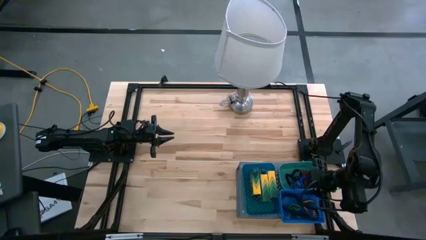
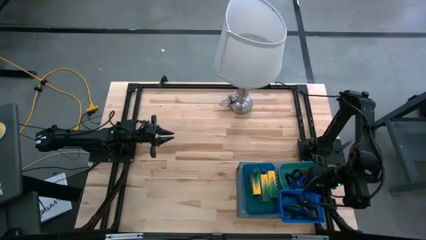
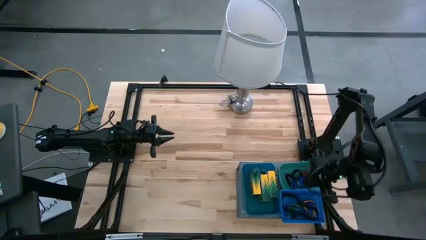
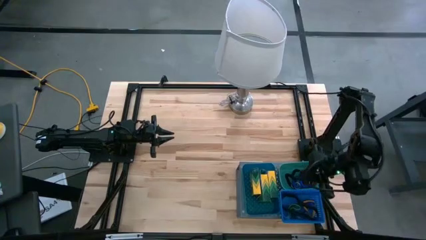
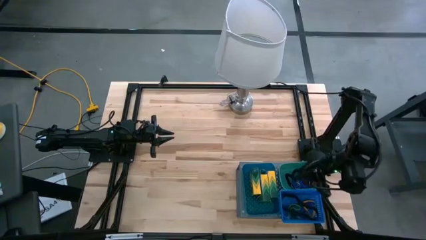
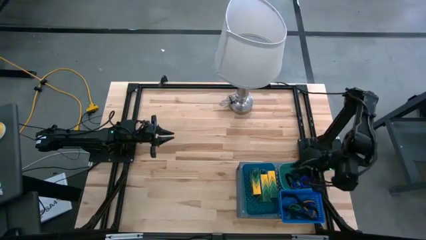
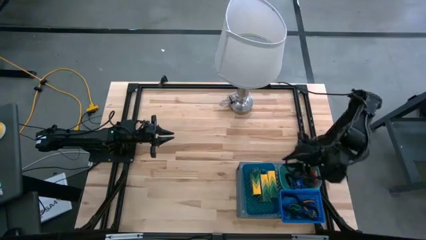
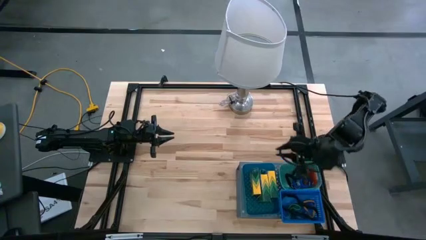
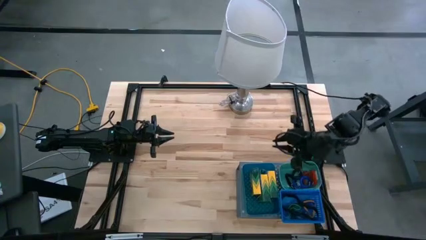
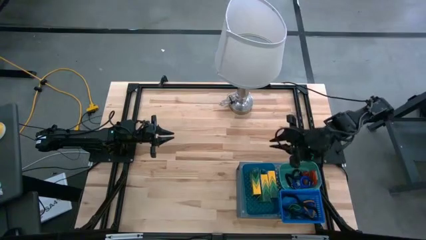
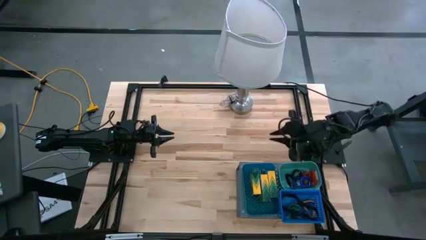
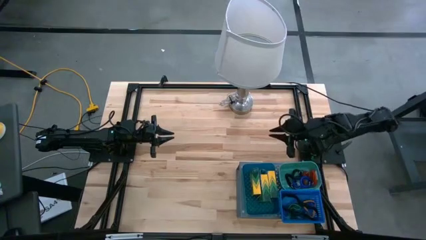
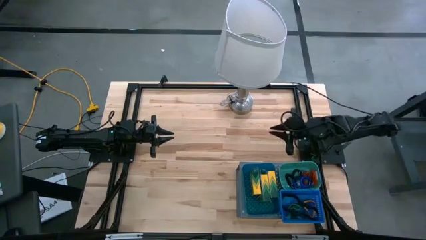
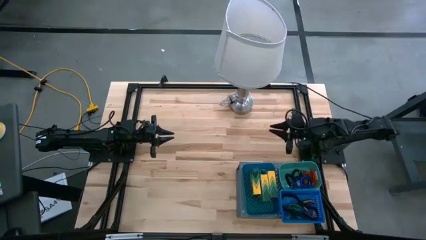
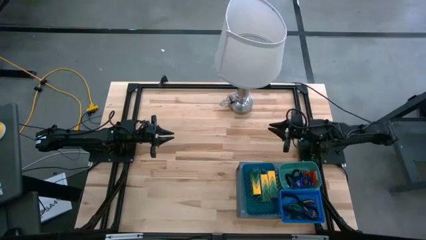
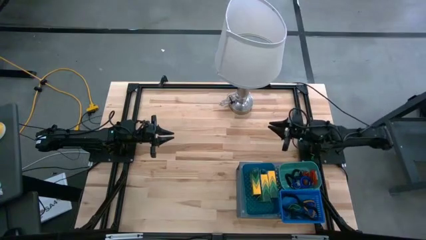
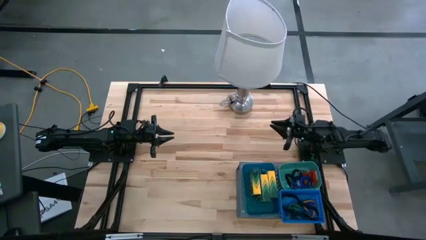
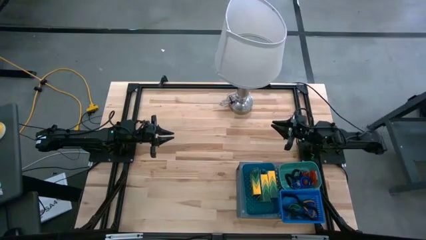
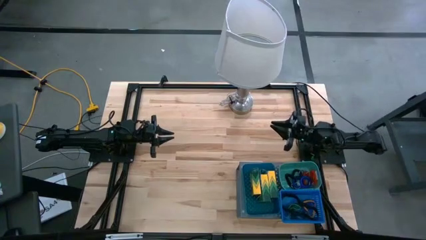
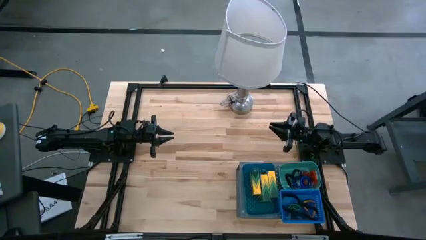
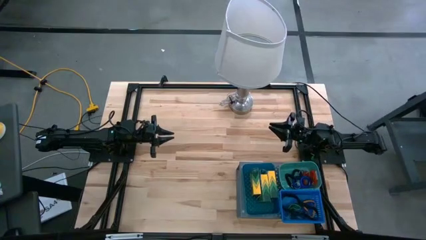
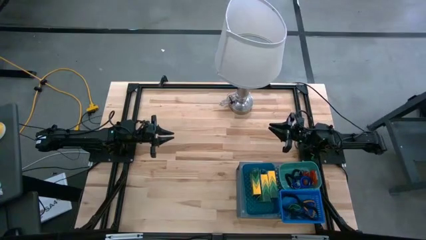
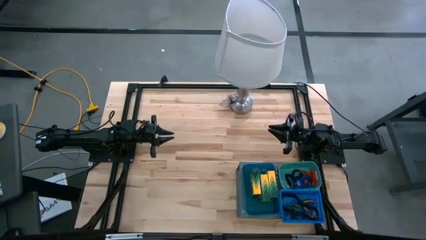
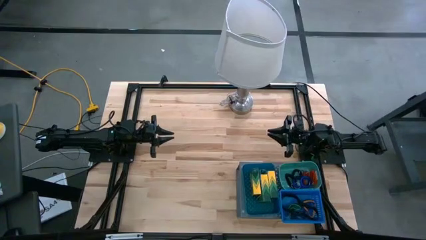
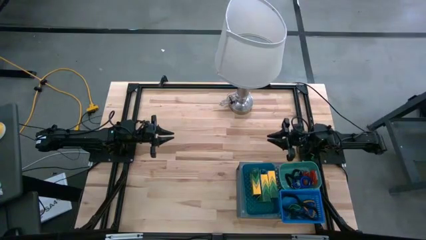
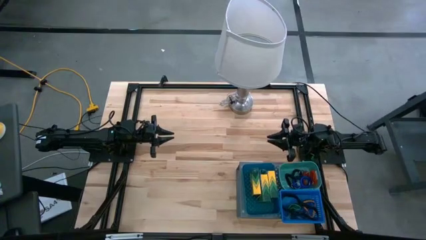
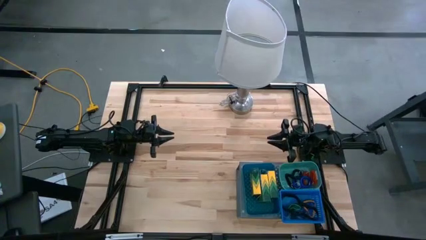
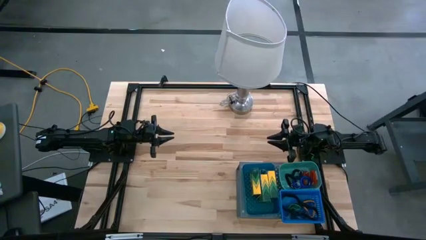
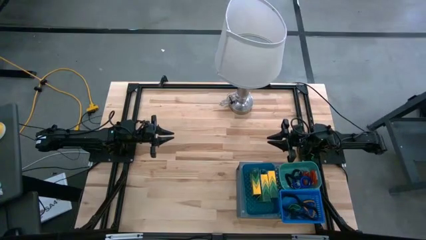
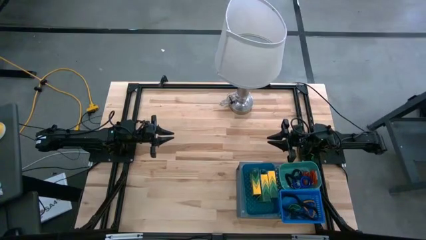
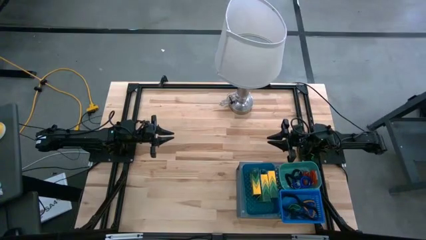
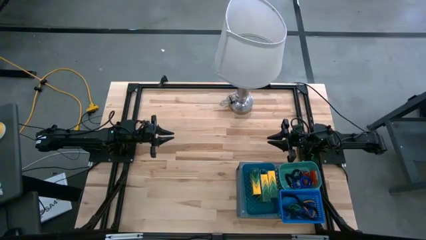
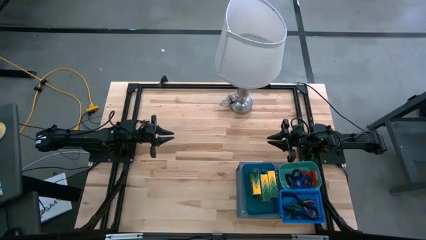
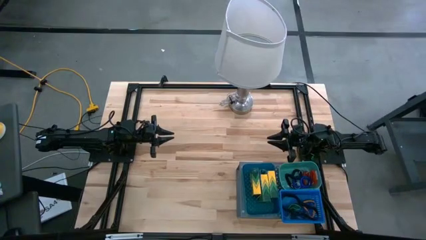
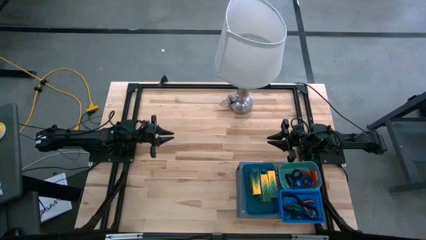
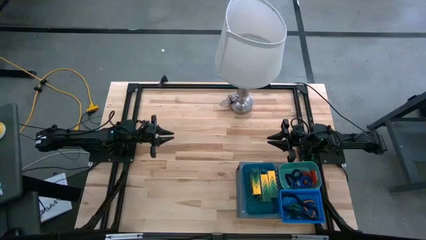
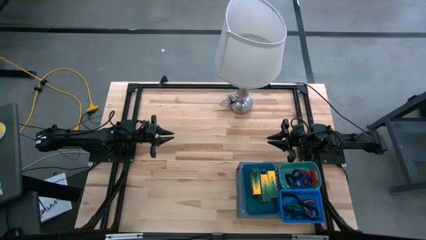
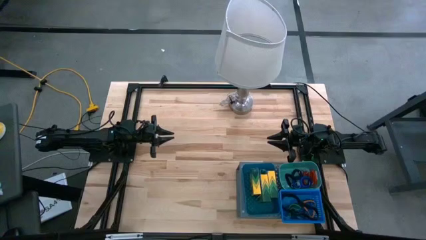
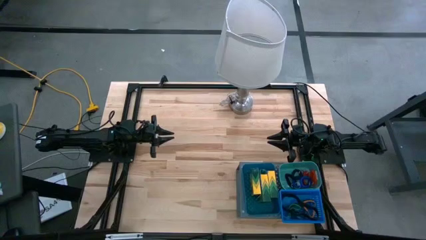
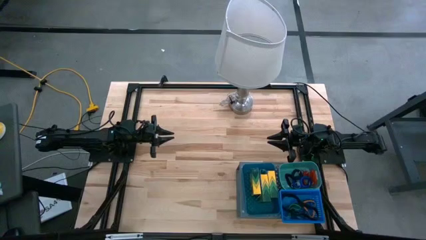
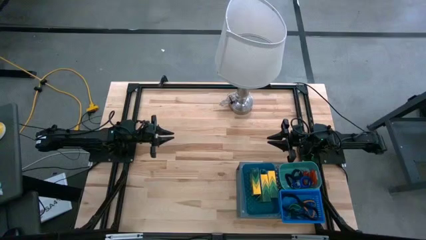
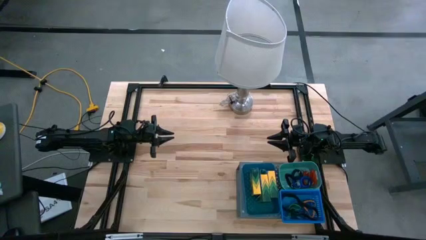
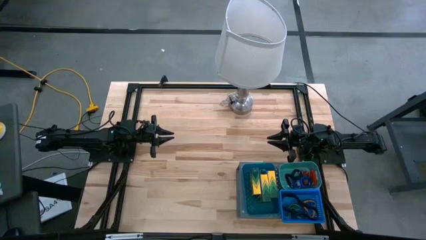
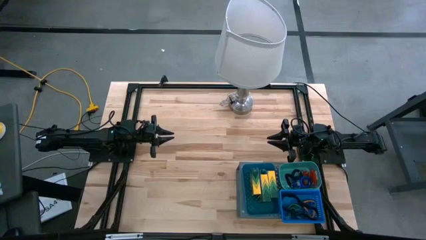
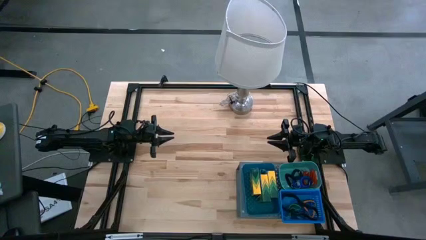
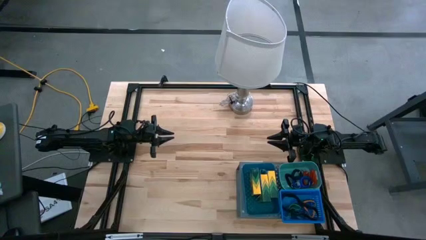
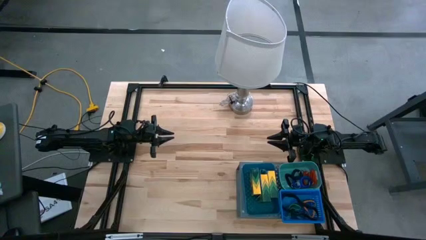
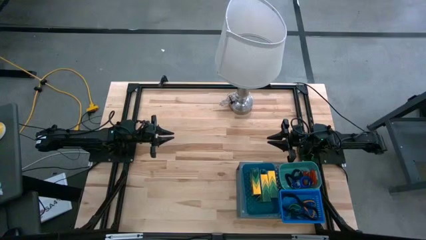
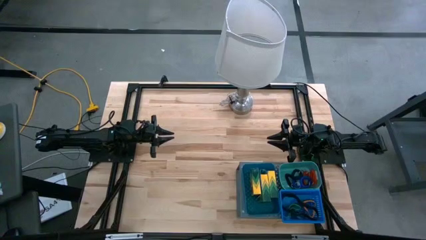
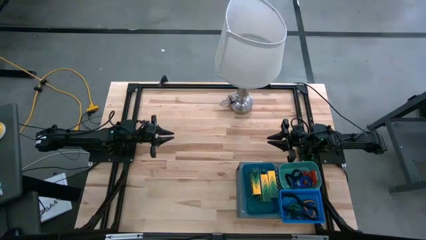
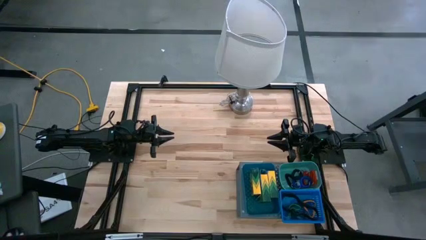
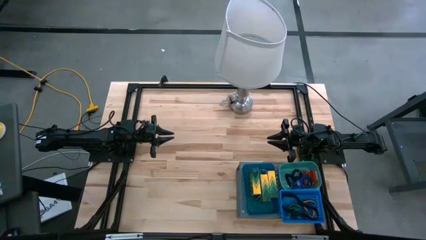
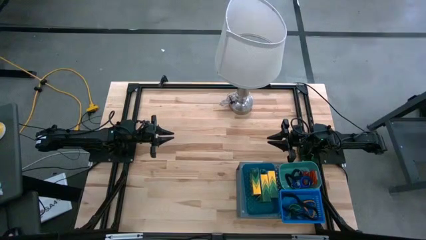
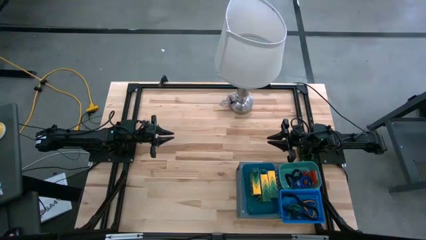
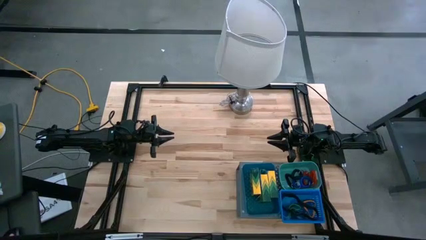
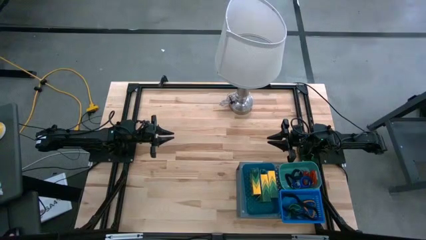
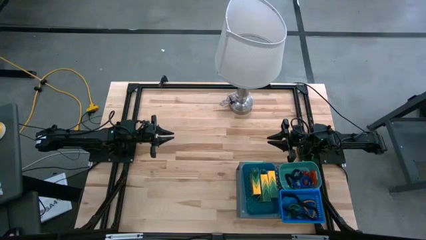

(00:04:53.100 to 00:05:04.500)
Task: Pick & Place Office Desk Supplies
Return to Home Position

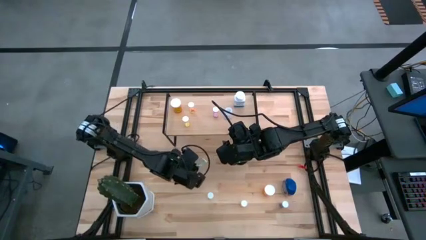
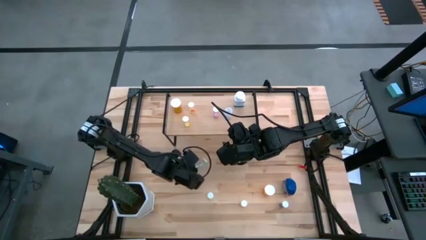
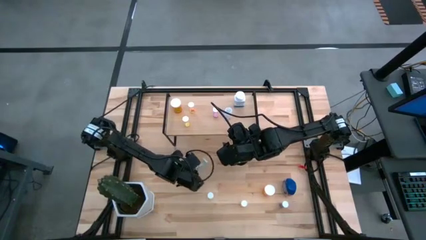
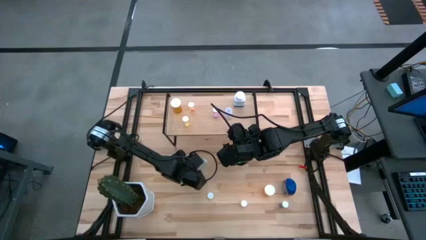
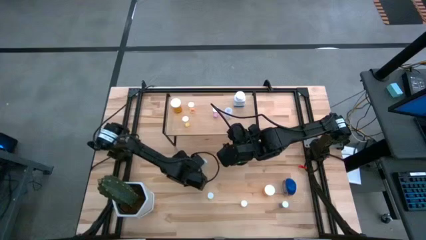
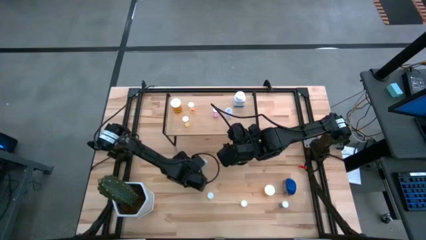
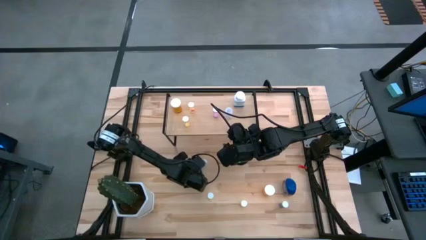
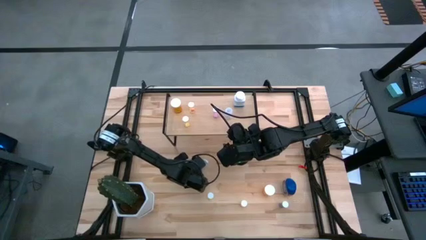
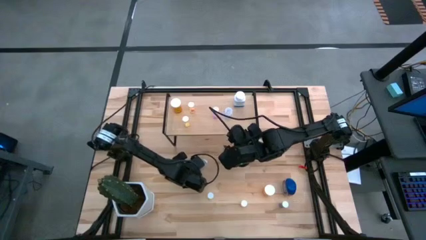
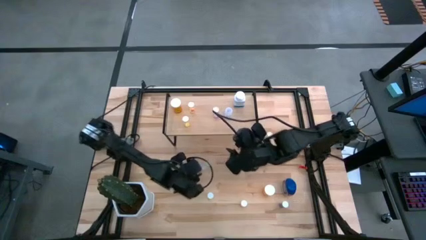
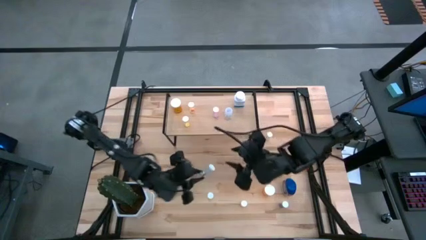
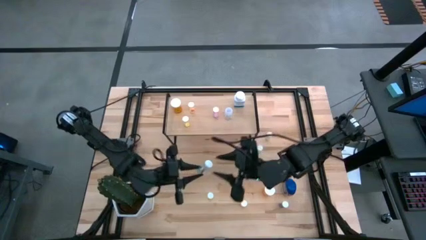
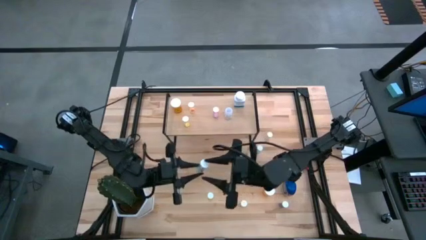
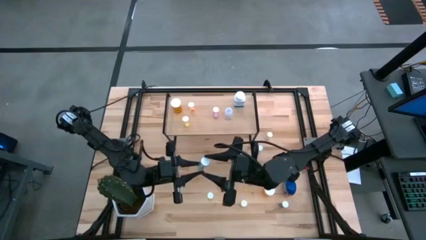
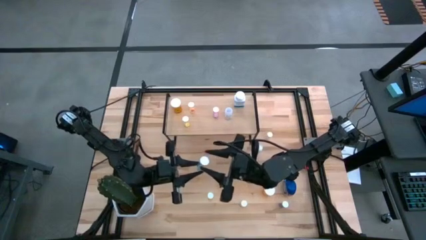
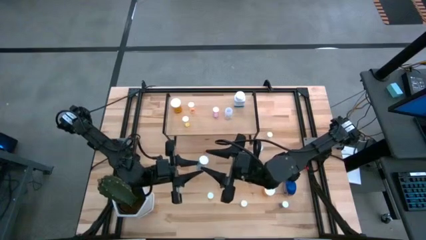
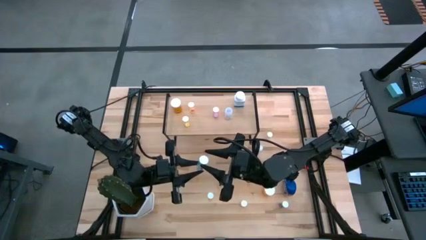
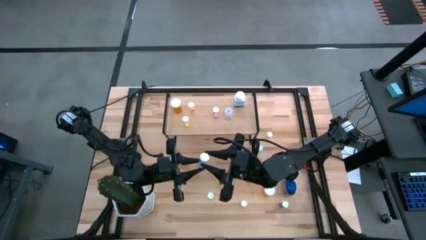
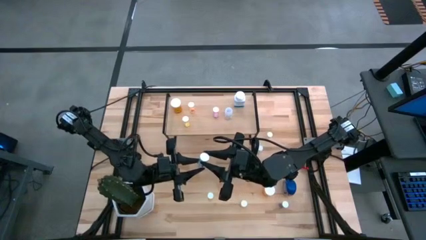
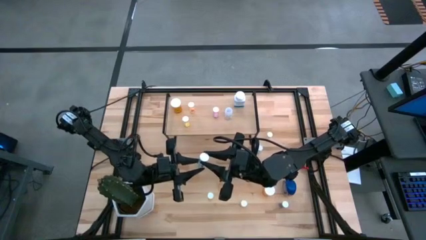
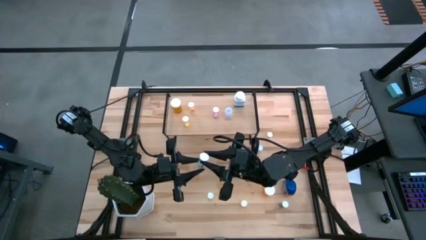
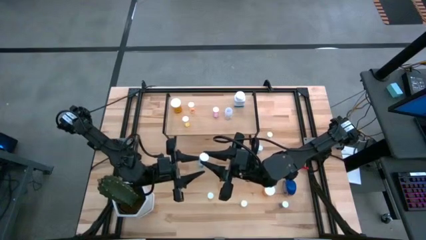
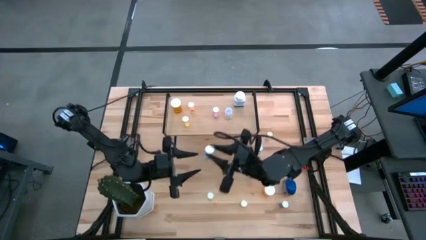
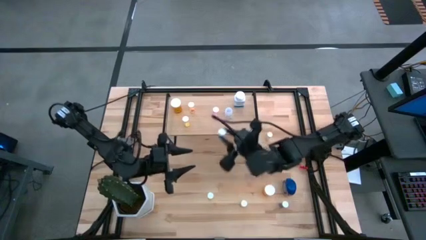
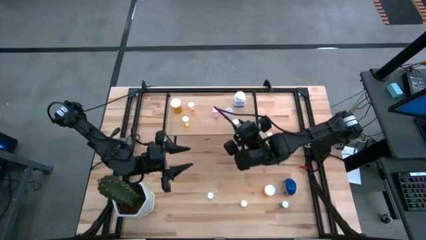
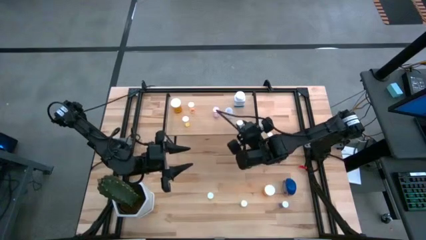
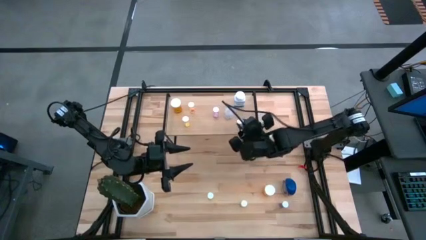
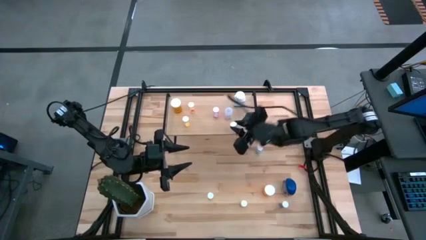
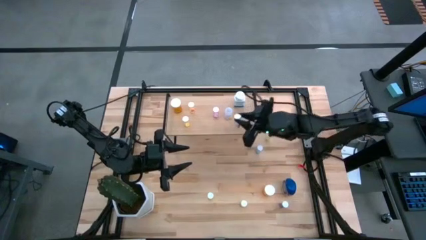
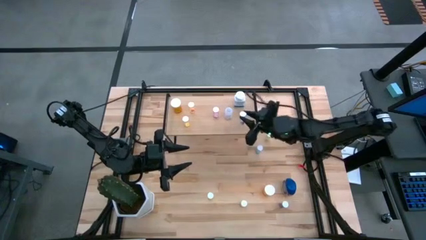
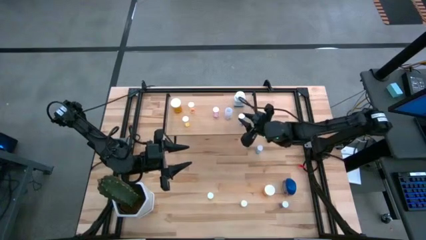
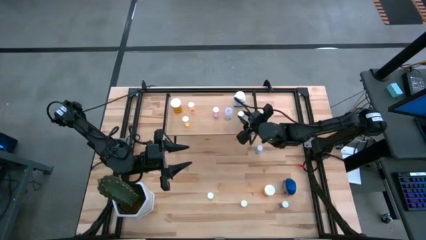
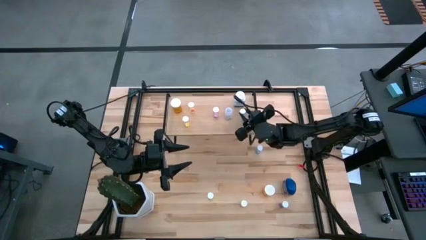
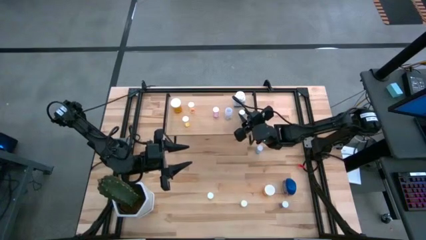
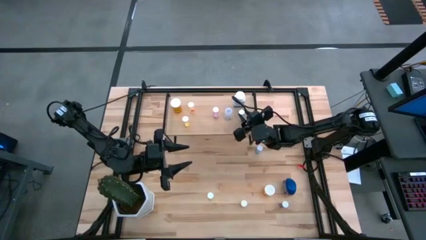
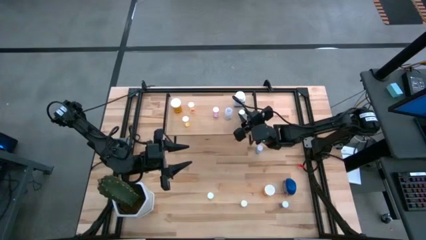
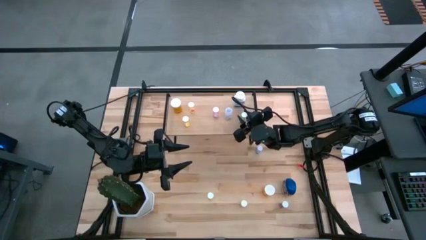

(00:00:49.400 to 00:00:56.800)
Task: Pick and place medicine bottles onto shelf by color
Put the blue pill bottle on the shelf
